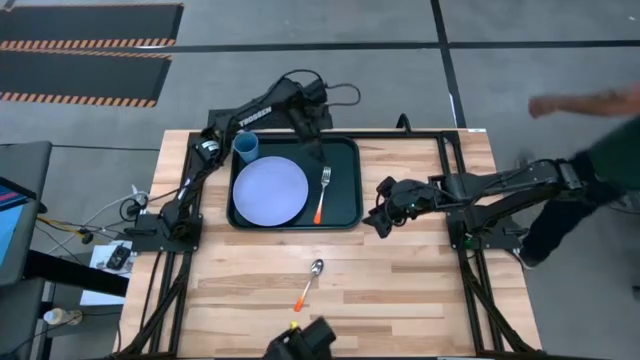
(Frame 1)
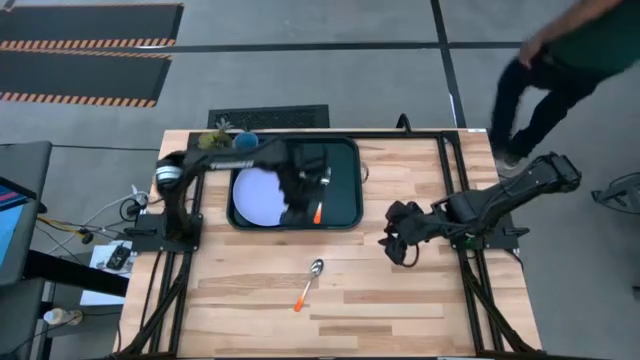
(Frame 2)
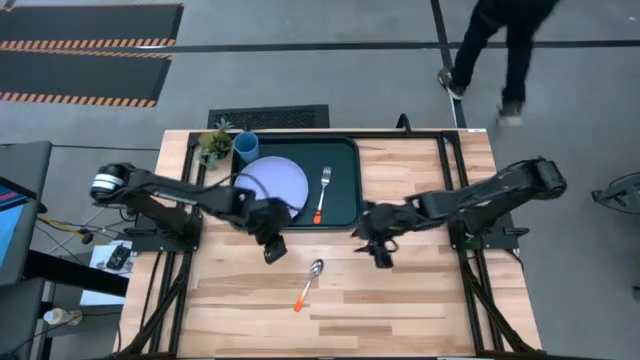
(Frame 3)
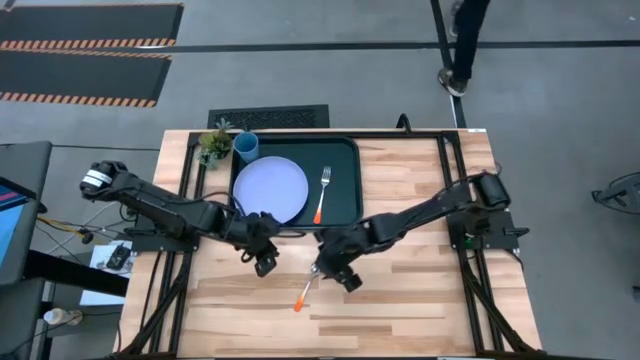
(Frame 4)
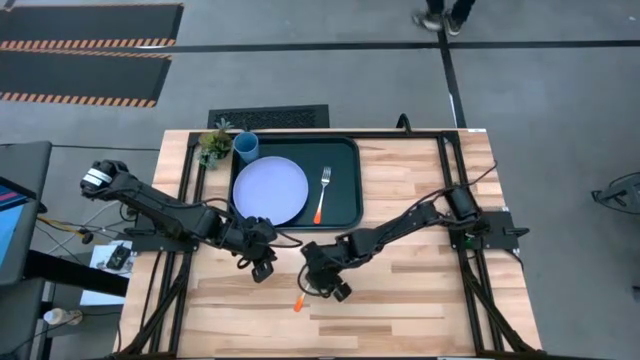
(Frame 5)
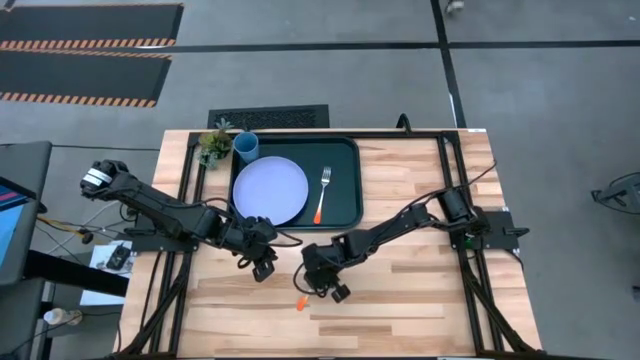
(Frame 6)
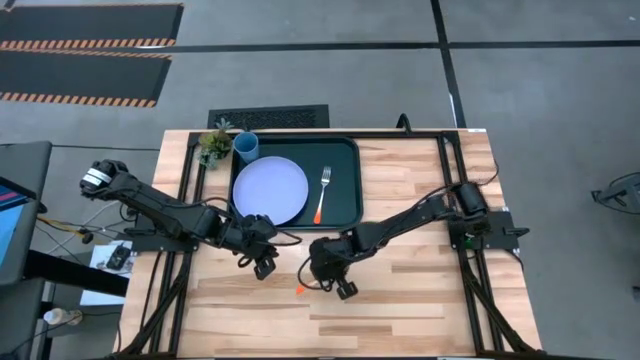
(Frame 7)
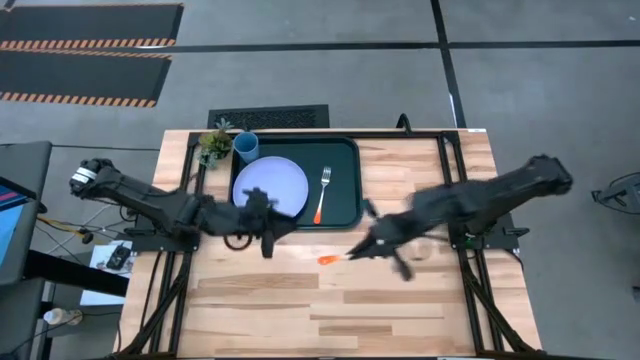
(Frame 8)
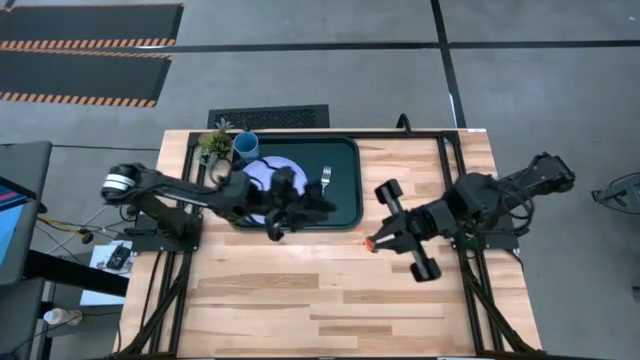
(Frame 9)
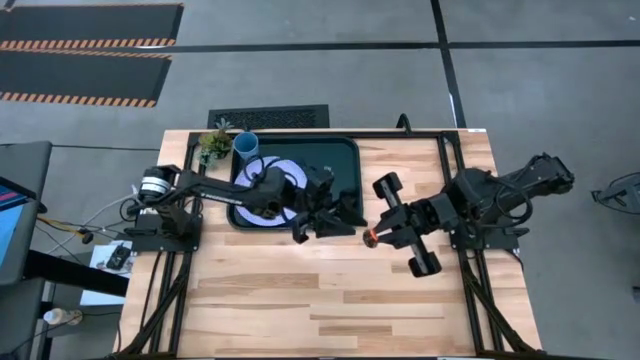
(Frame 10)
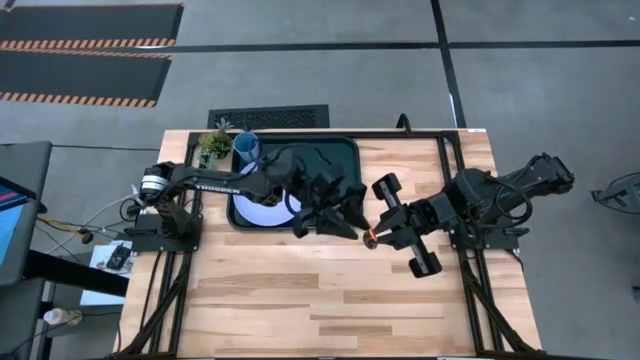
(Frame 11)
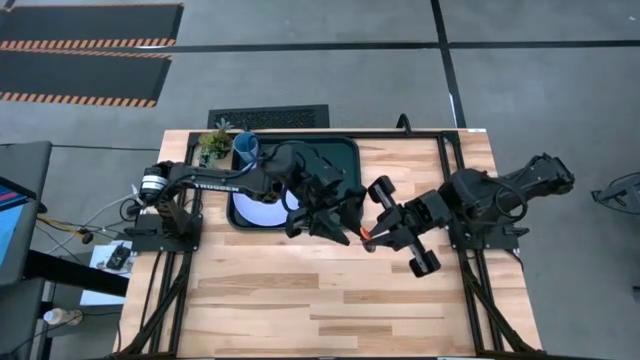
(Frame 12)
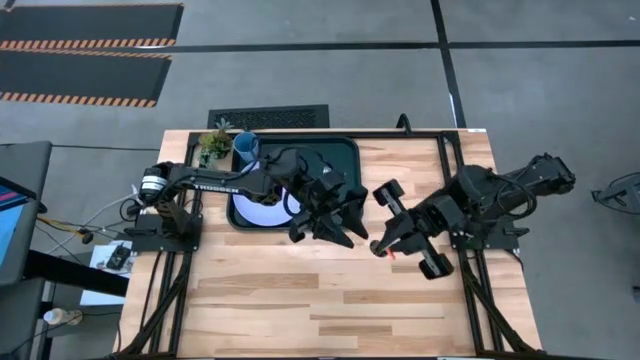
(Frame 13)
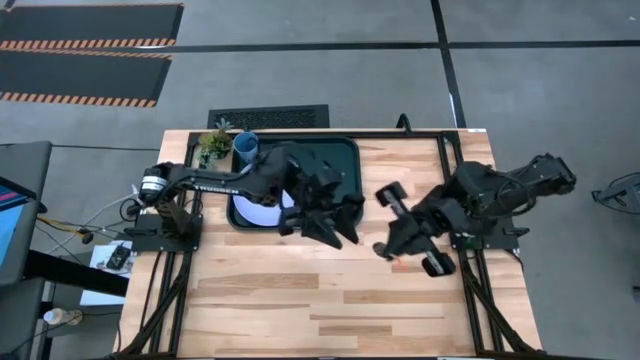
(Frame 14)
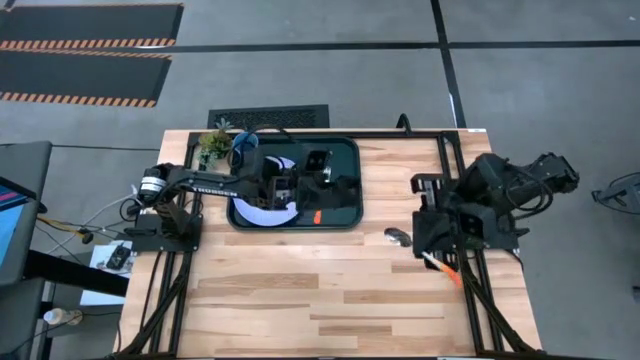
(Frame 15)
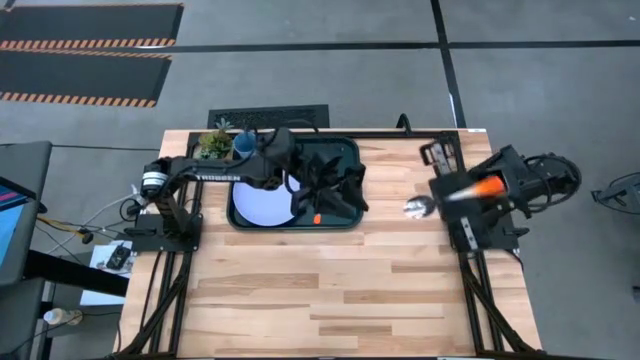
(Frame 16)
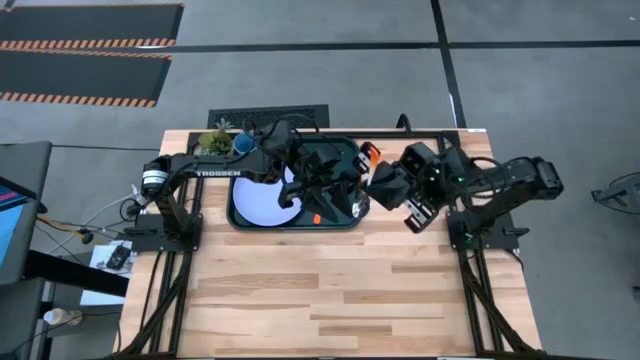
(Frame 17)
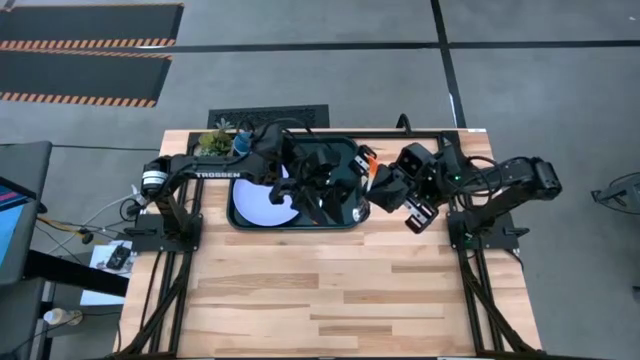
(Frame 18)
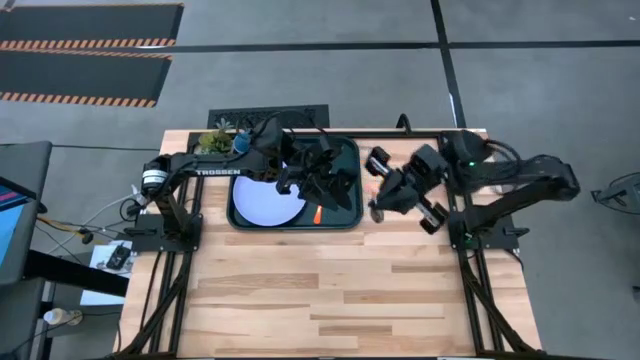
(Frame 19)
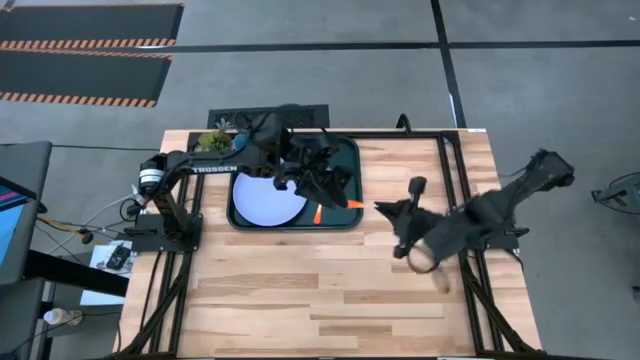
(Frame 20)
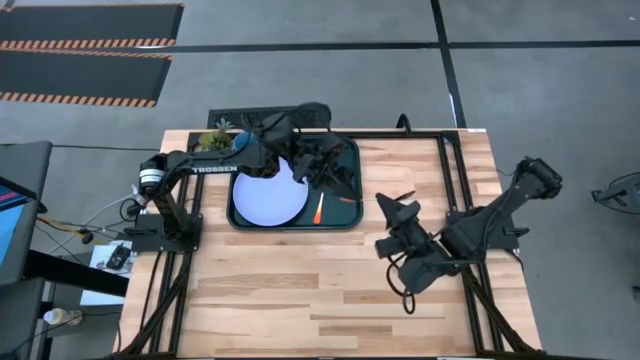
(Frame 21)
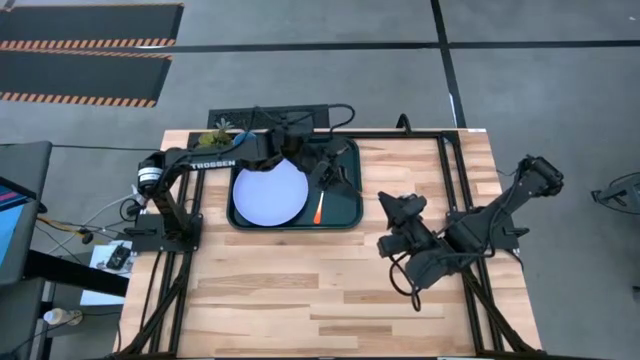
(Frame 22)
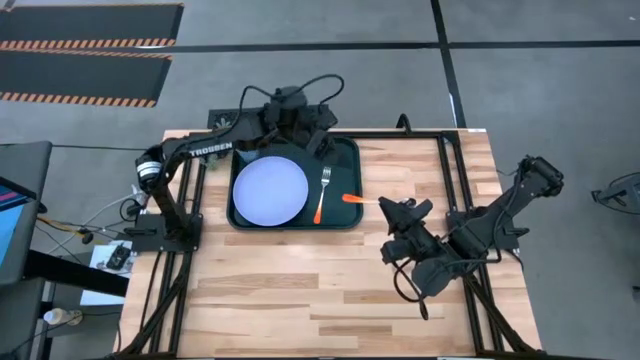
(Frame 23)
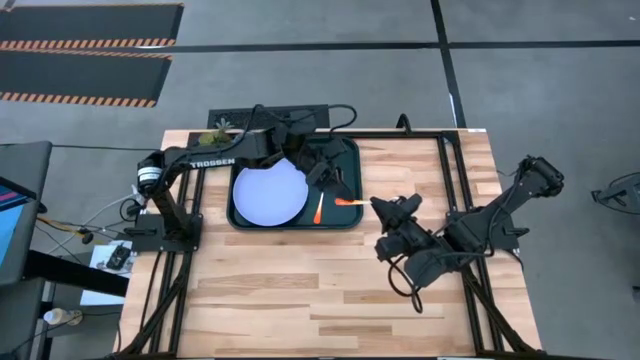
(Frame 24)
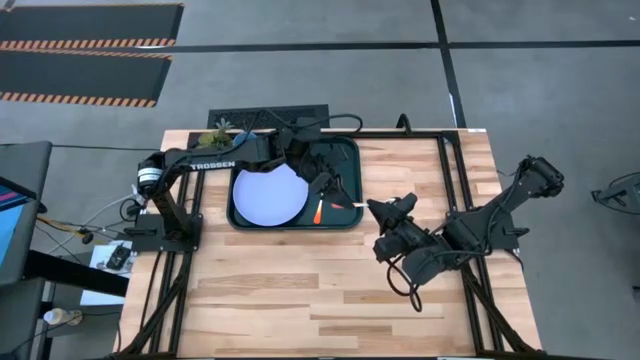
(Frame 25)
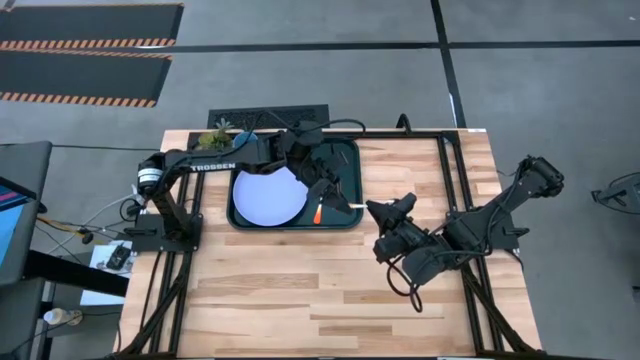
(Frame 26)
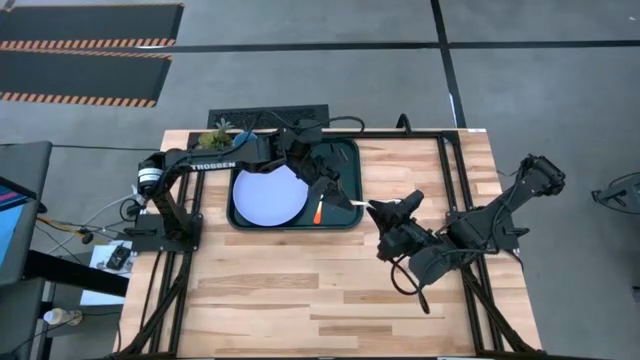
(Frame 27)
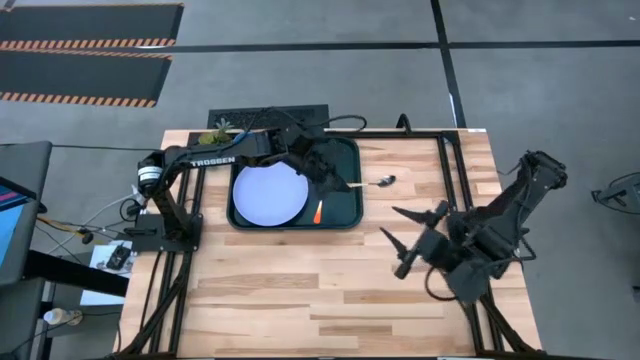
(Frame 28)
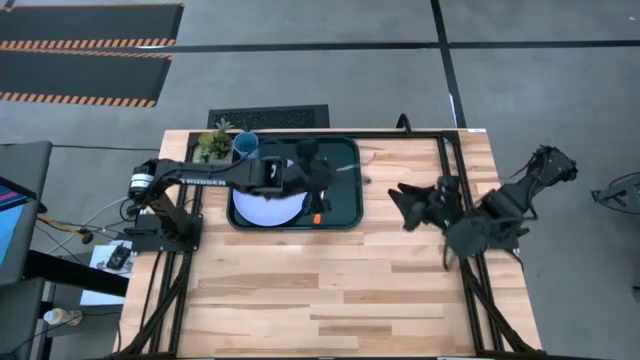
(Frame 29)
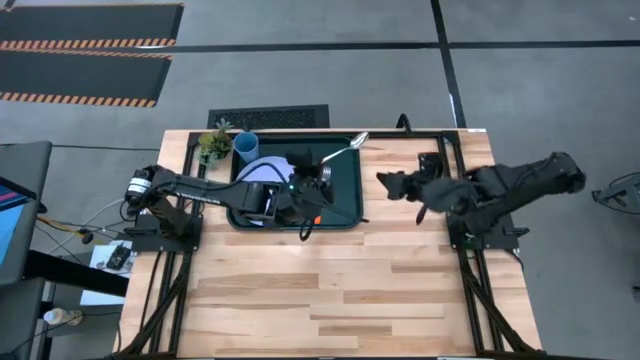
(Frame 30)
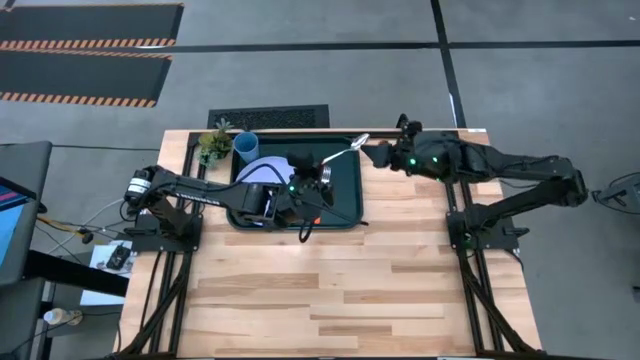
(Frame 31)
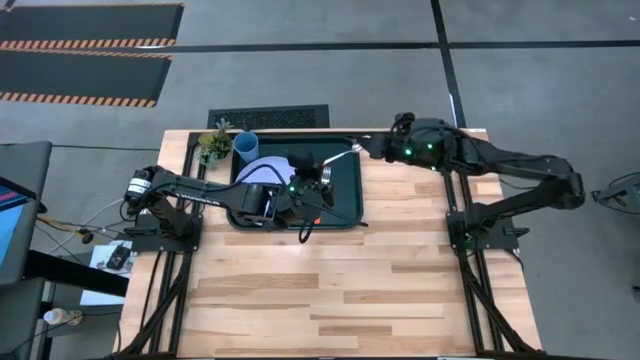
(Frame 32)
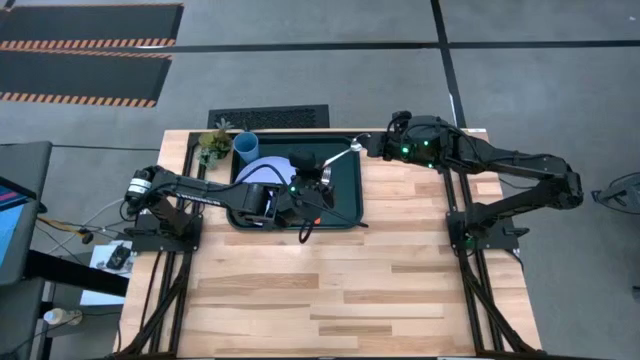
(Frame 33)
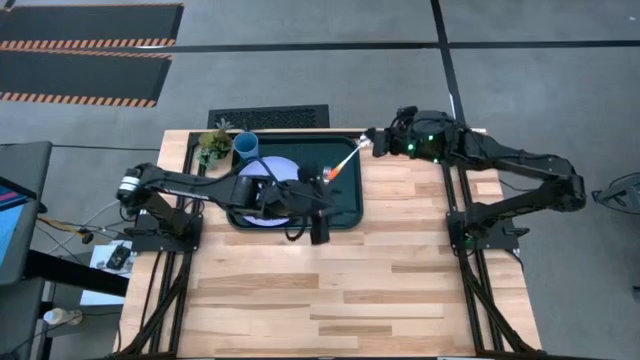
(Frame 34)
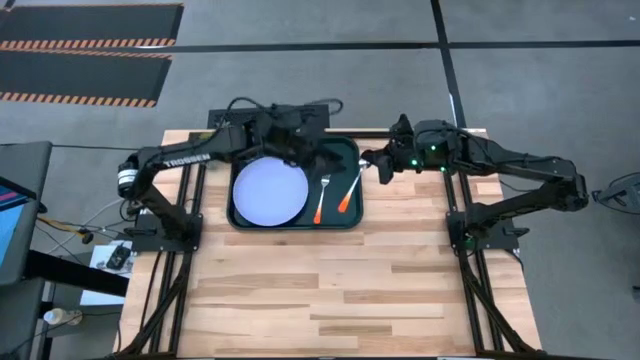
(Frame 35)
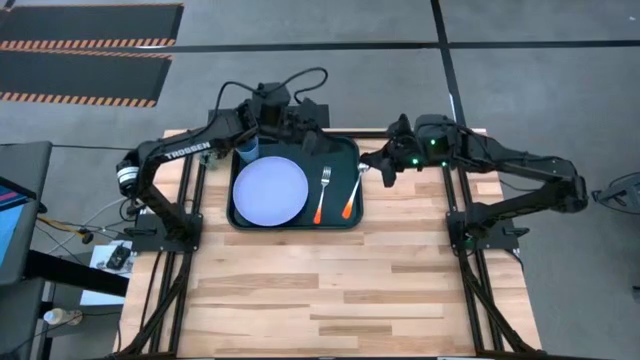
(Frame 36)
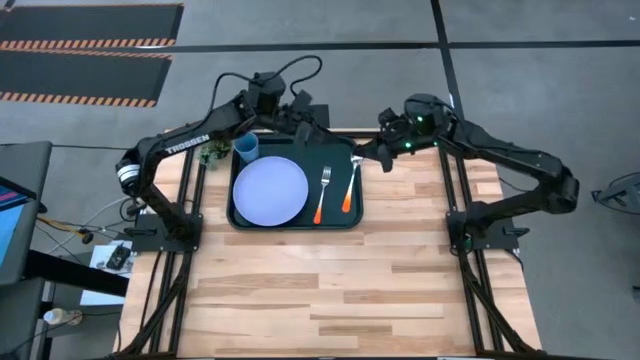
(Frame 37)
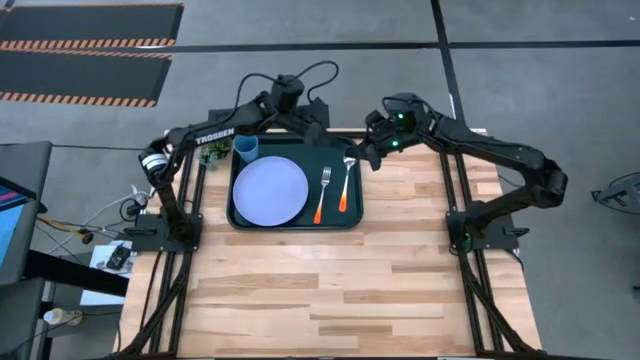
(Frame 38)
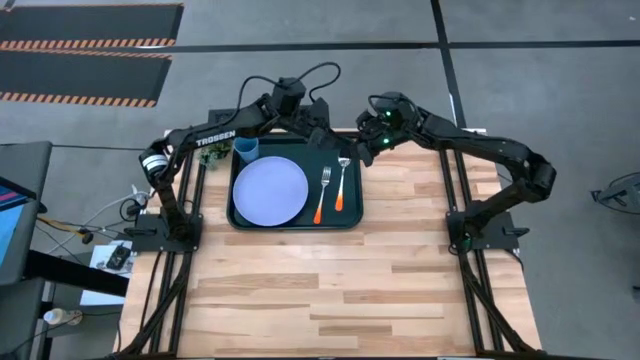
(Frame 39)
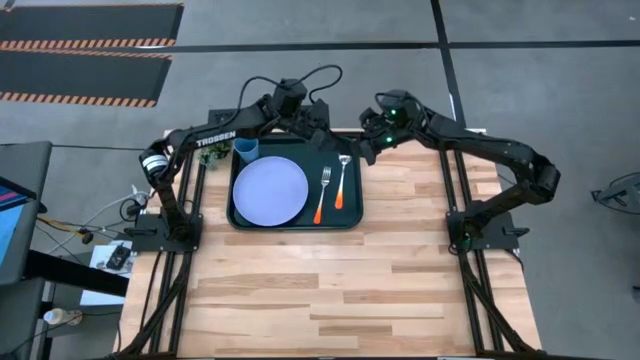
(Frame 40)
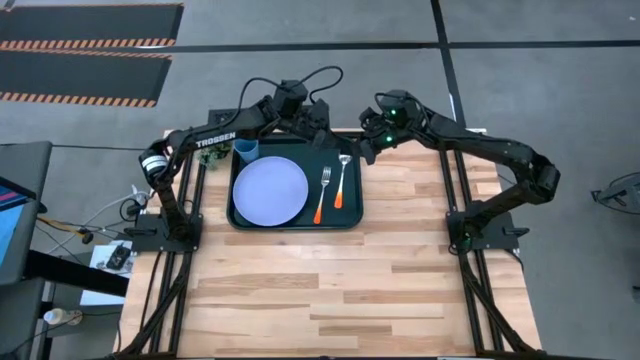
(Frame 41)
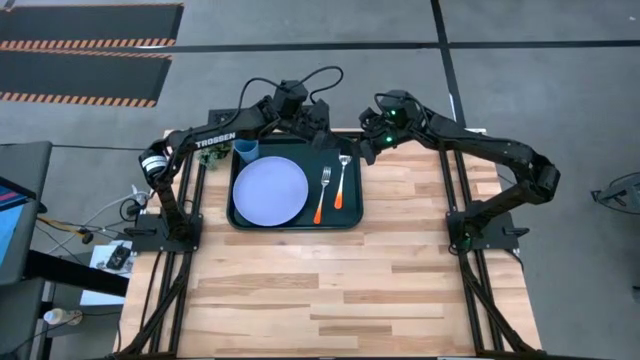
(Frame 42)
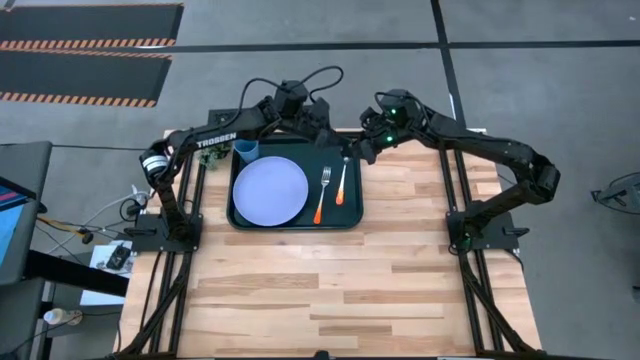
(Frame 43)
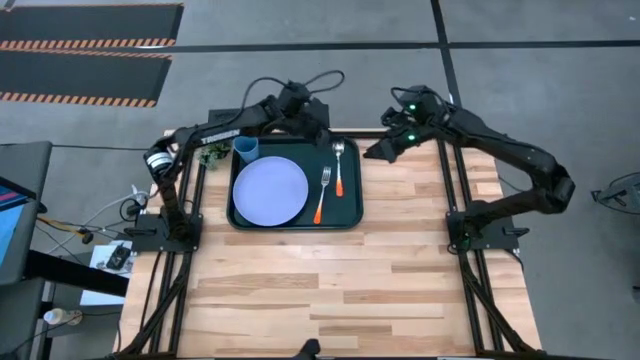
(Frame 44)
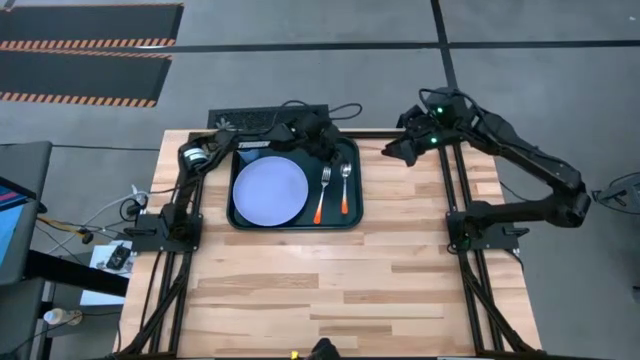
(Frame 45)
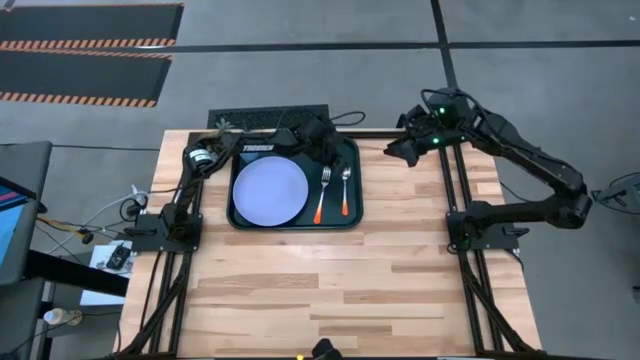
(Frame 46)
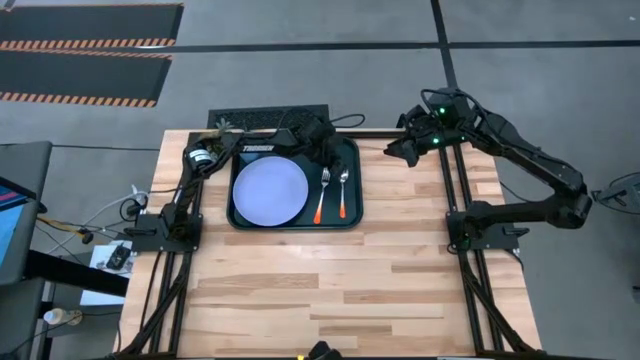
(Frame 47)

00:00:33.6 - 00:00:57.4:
Task: Pick and place plate/cup/fork/spoon on tray
Place the orange spoon to the right of the orange fork on the dark green tray
